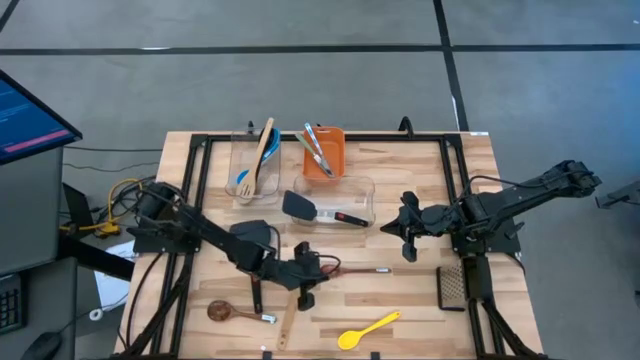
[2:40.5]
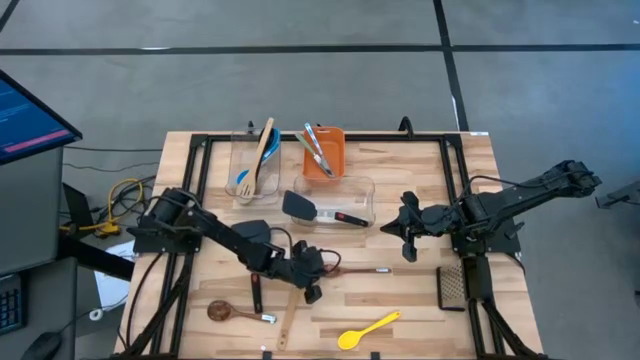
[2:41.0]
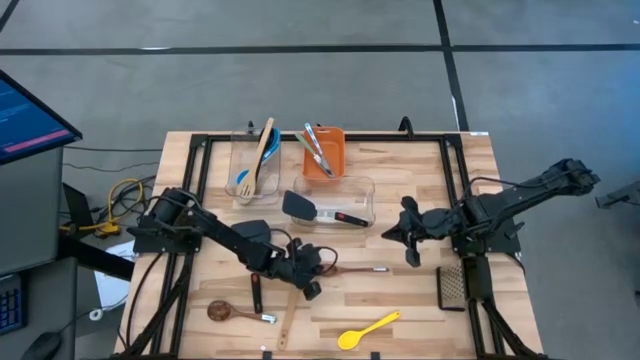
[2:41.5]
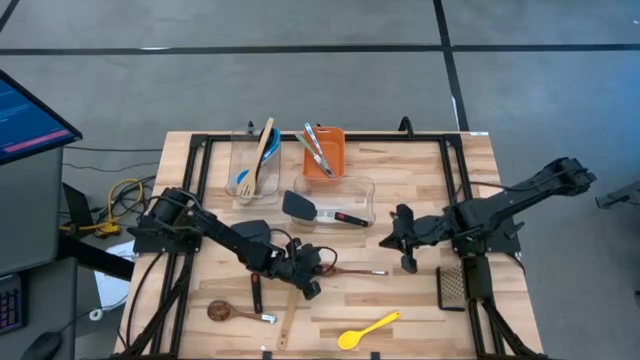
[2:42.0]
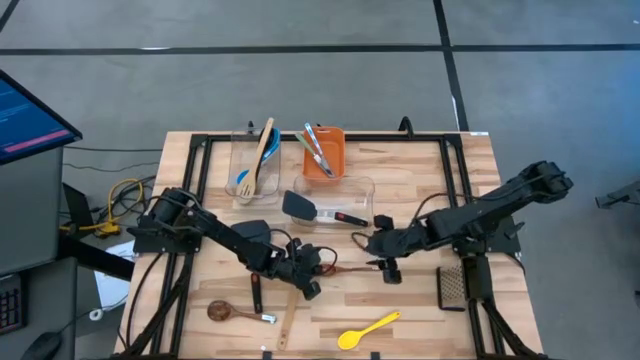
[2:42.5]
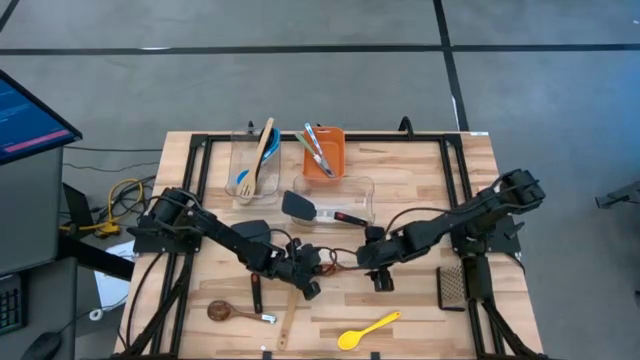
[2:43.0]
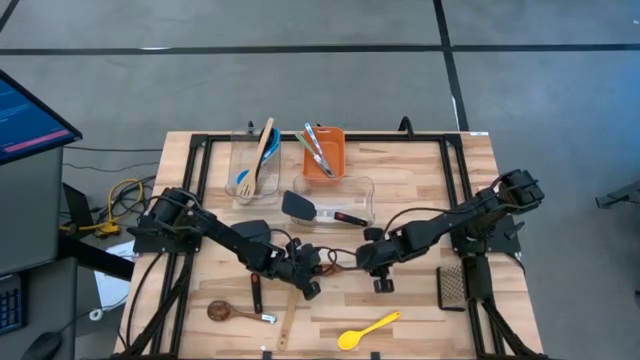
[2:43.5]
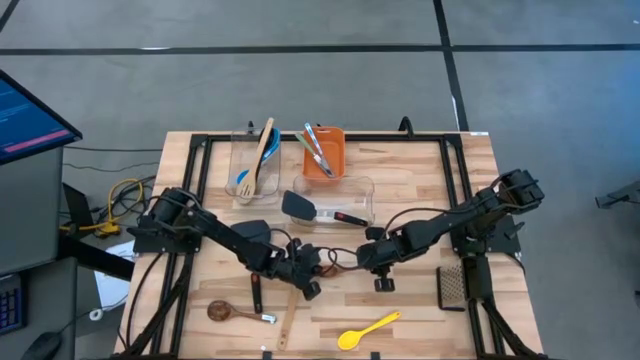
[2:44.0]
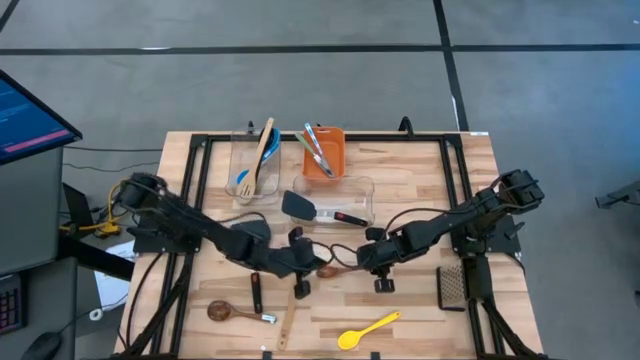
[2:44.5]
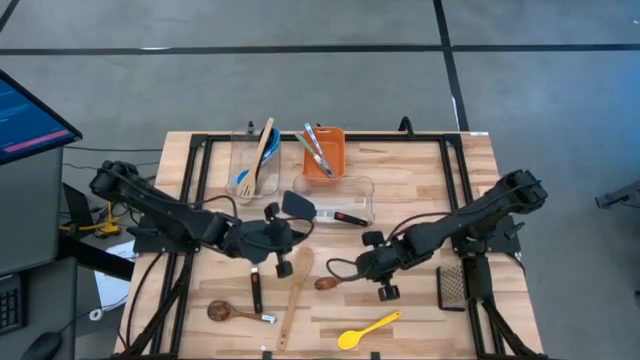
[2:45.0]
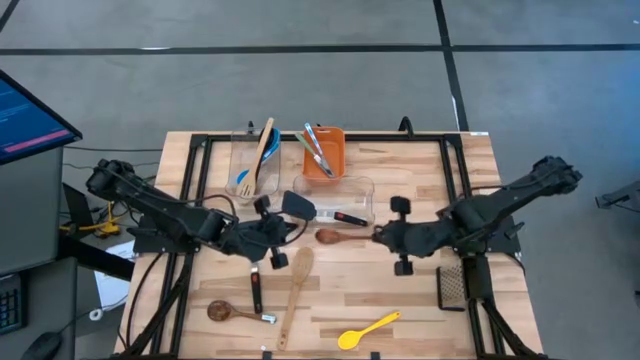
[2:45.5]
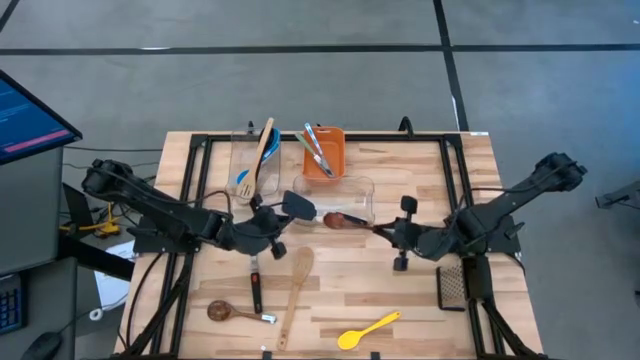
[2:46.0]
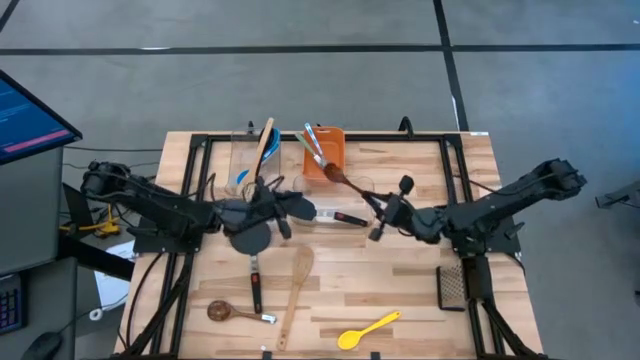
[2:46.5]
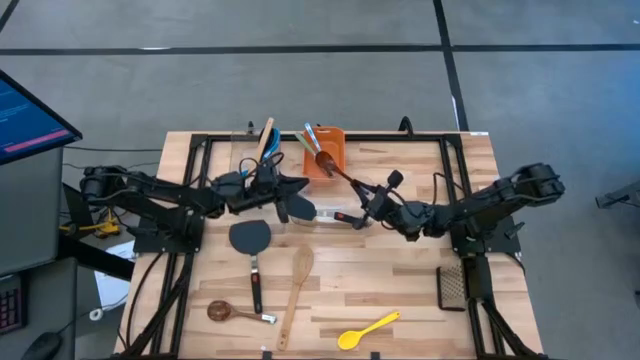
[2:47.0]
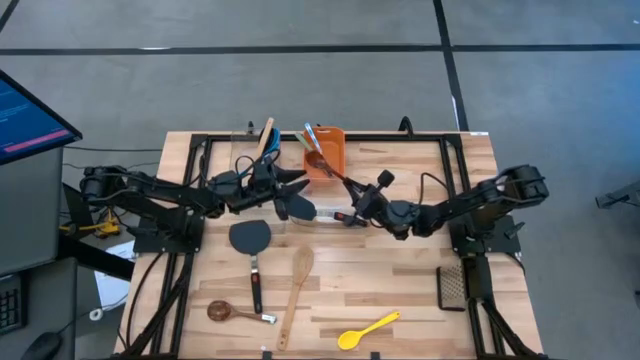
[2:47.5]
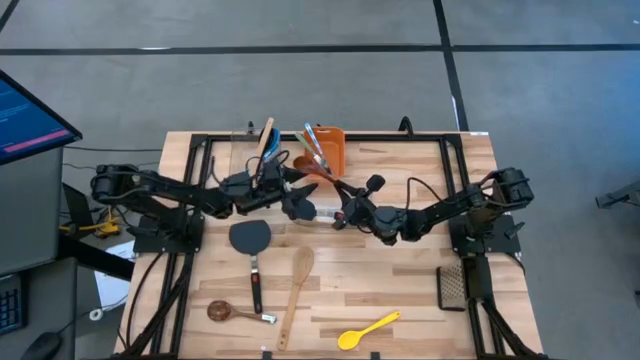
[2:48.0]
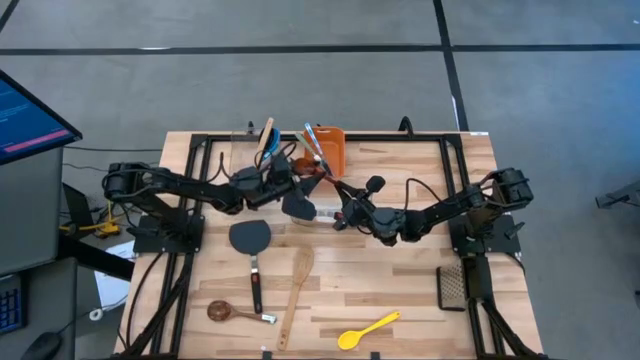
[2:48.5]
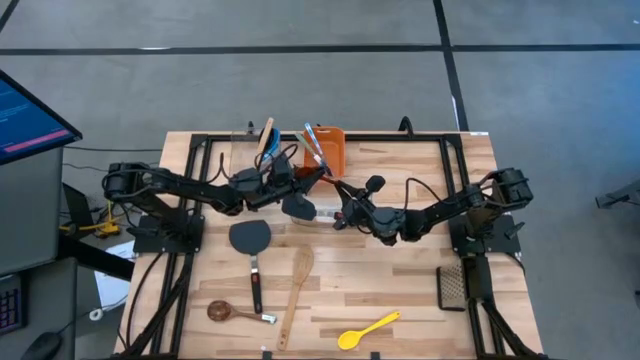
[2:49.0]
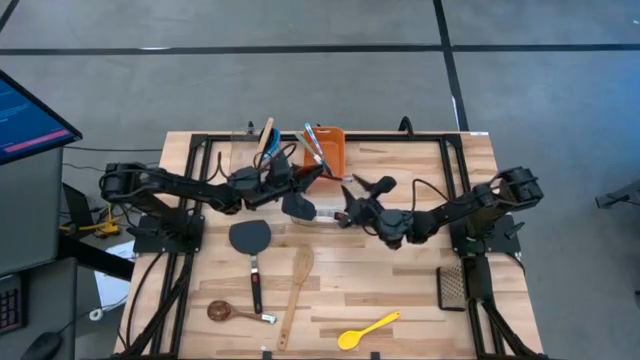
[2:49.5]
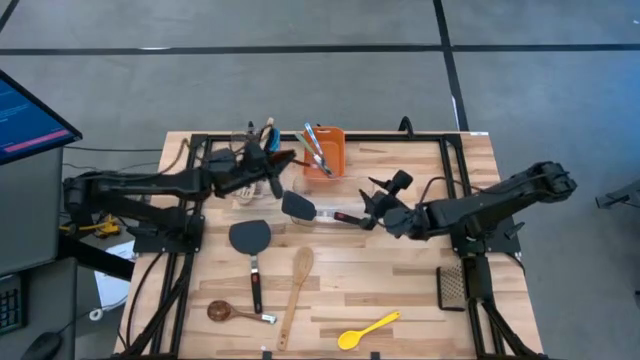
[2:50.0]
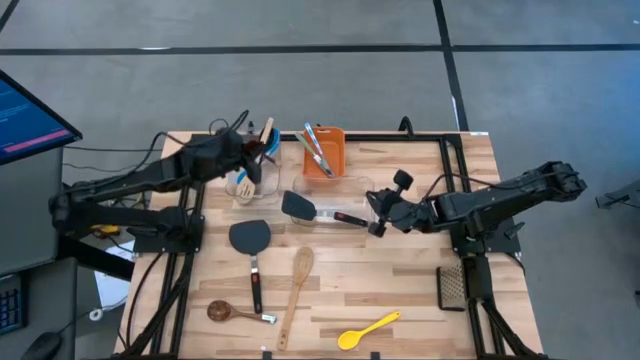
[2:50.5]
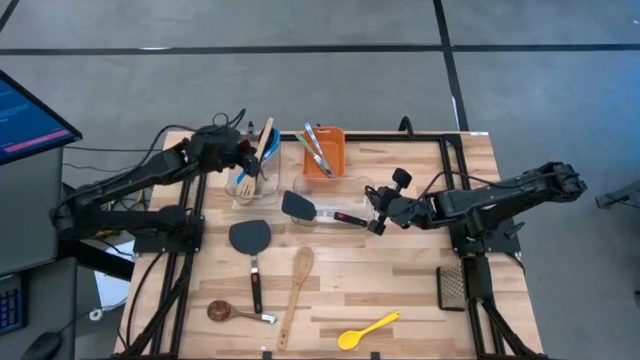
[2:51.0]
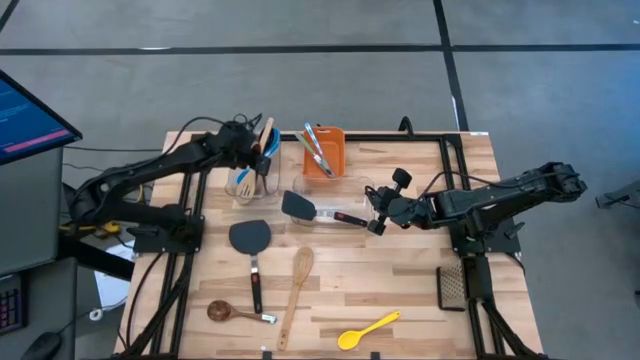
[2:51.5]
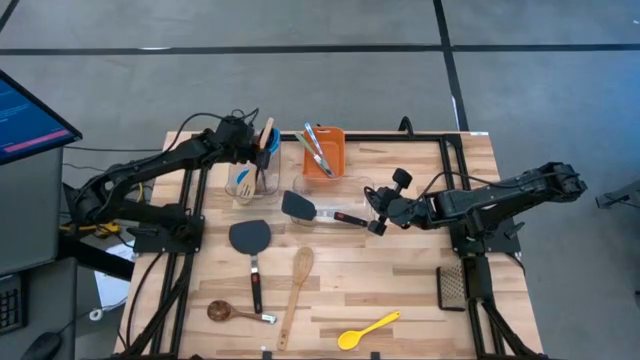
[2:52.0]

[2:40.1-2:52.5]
Task: Pick & Place Kitchen Items
Put the top dark brown spoon into the top transparent bin

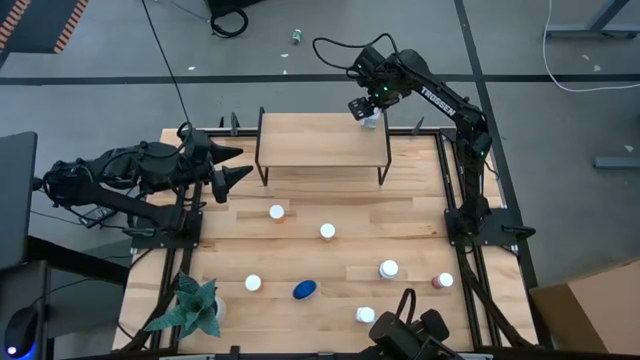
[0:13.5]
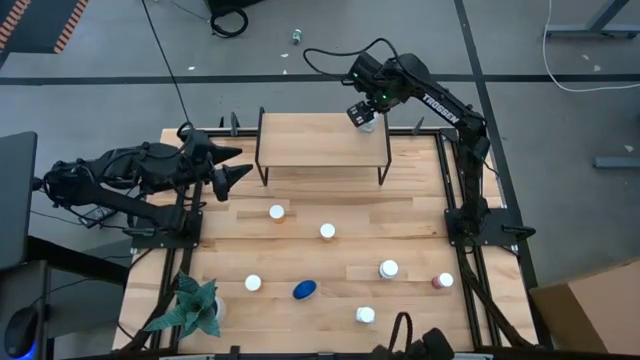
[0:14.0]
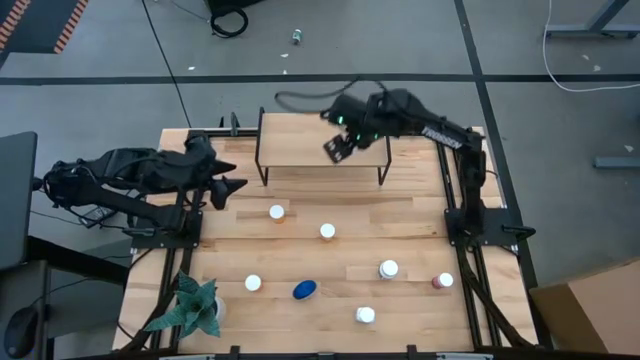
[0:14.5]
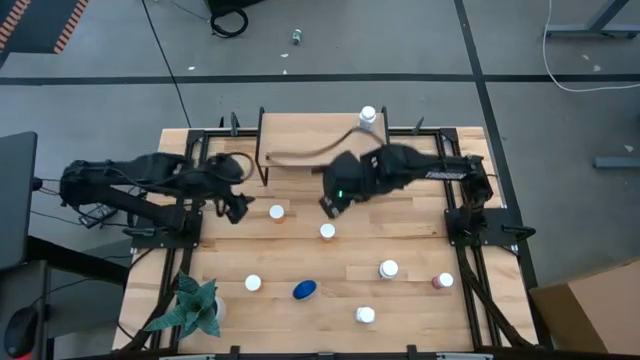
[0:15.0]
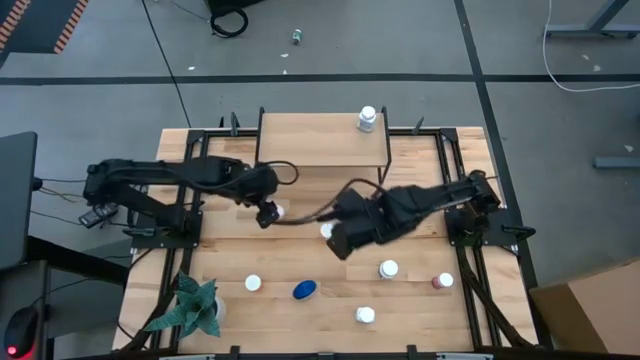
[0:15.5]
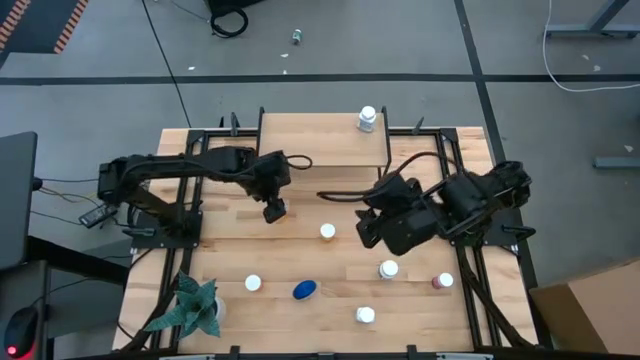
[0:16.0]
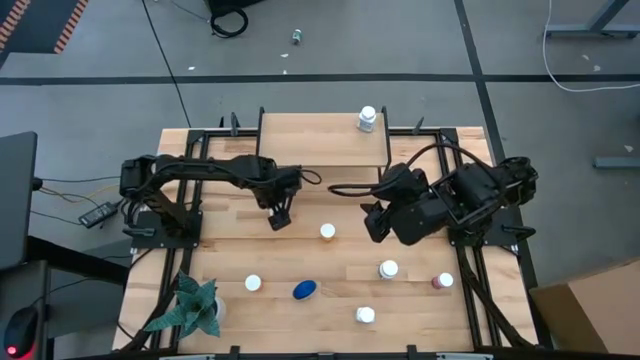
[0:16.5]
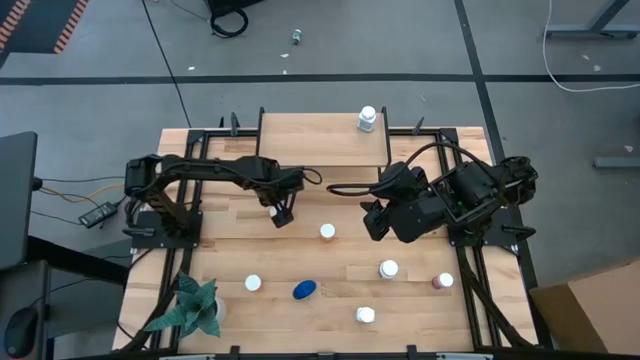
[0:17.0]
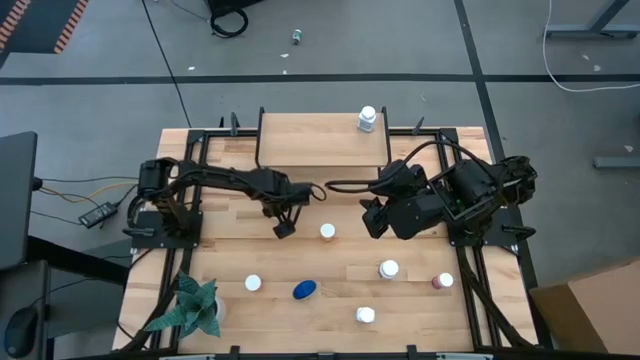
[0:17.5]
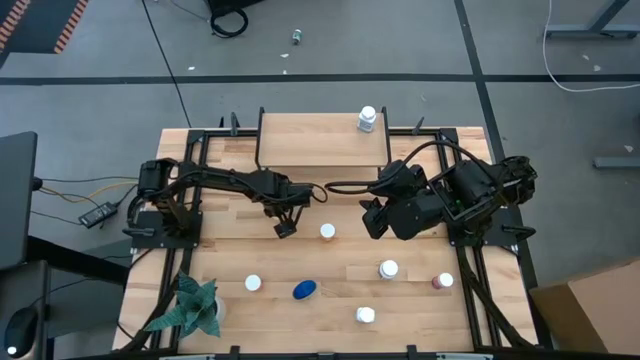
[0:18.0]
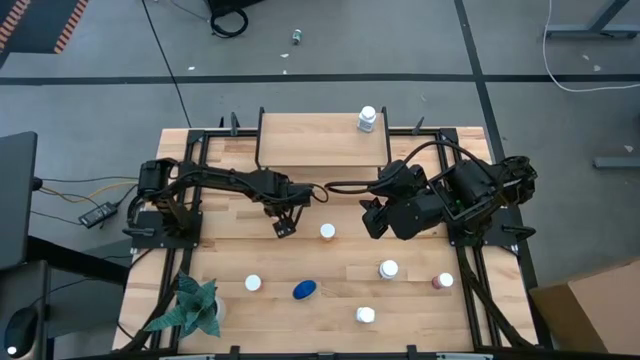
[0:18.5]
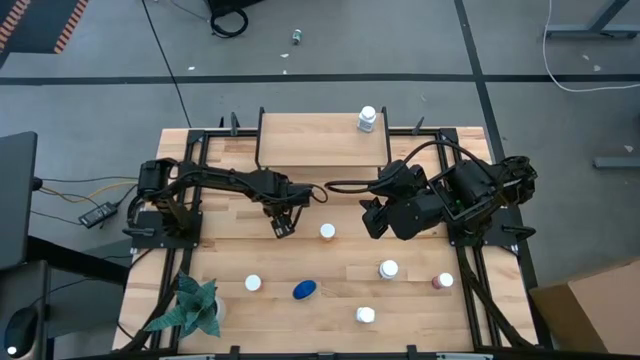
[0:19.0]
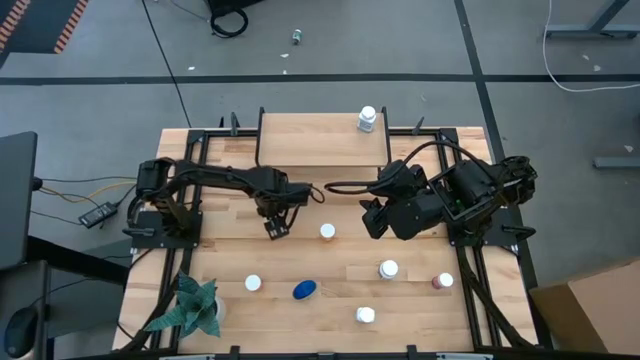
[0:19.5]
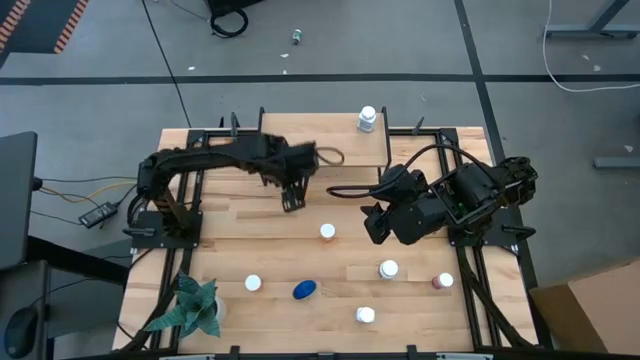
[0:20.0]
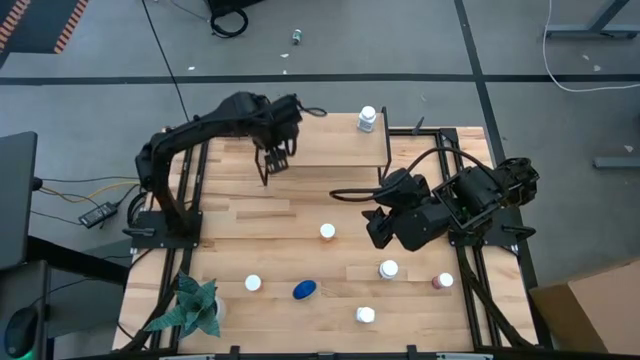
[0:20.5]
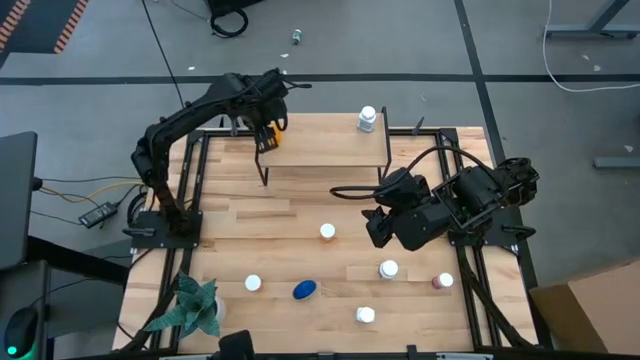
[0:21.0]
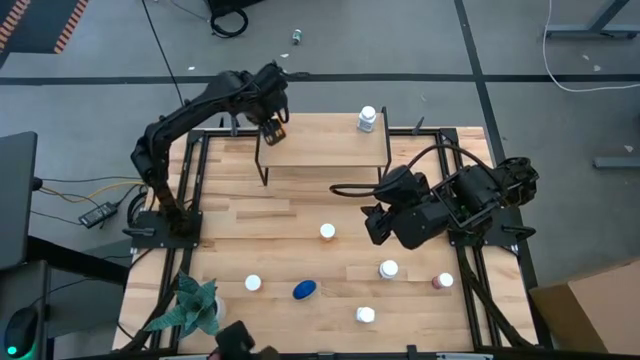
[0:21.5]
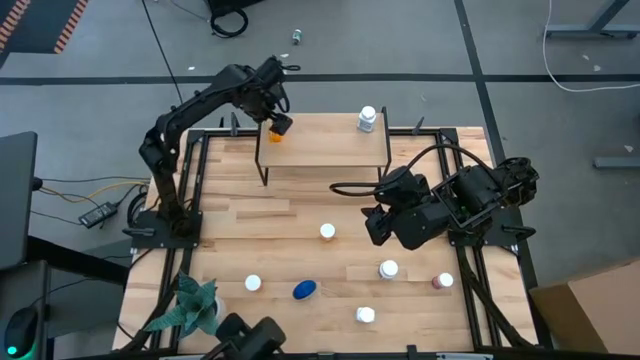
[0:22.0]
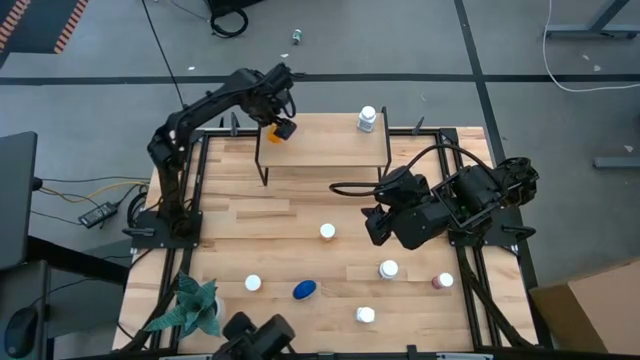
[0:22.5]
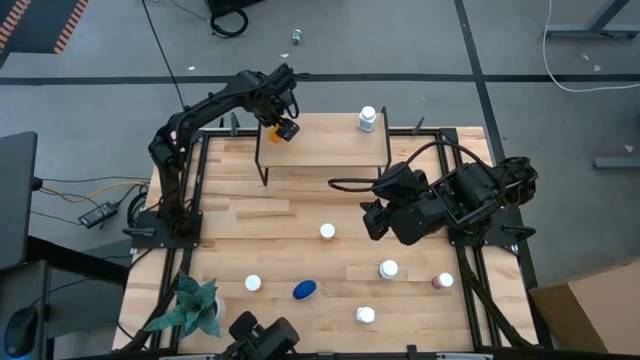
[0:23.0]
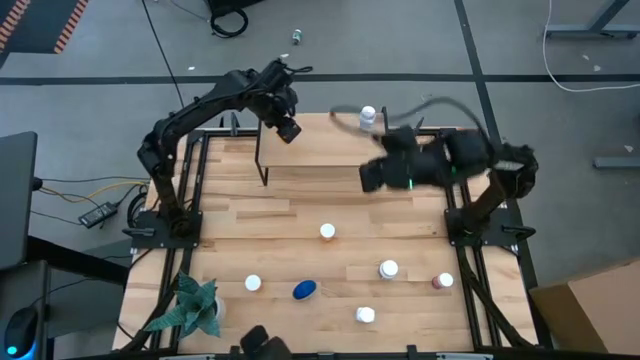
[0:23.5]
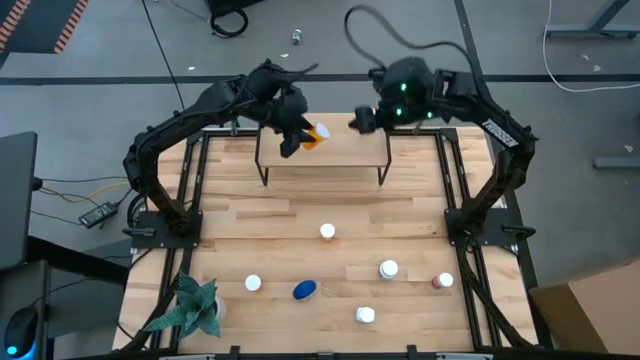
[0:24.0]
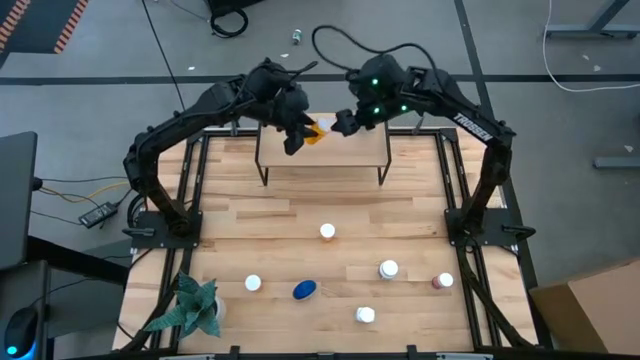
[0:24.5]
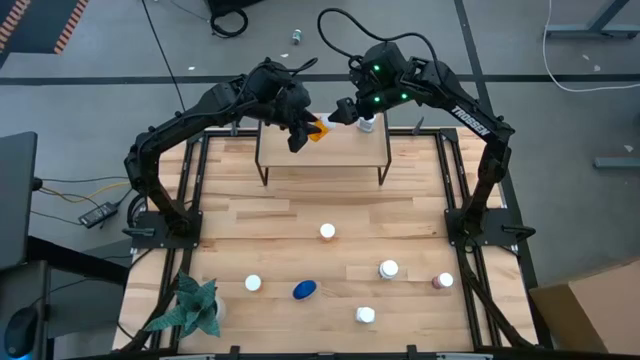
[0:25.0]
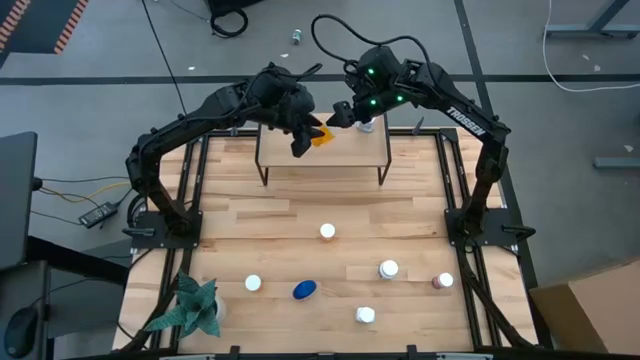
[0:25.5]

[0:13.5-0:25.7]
Task: Pick and place medicine bottles onto shelf by color
Put the top orange pill bottle on the shelf
